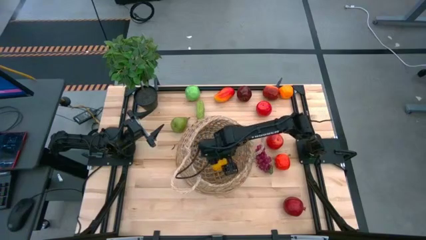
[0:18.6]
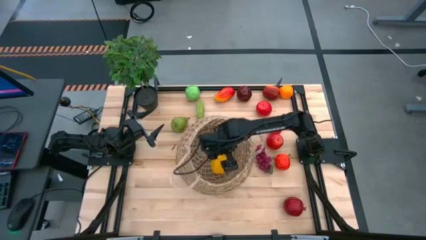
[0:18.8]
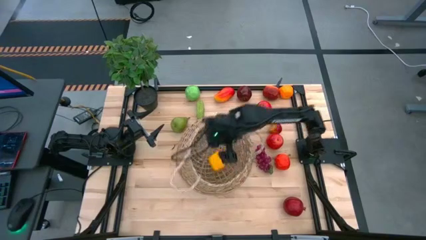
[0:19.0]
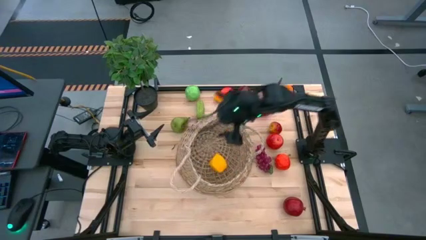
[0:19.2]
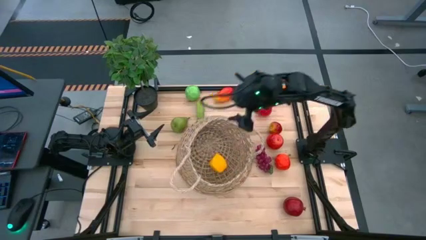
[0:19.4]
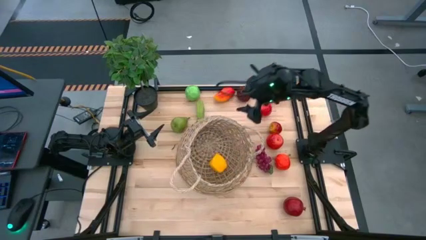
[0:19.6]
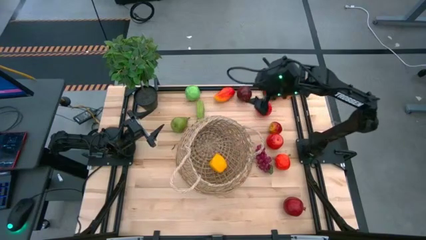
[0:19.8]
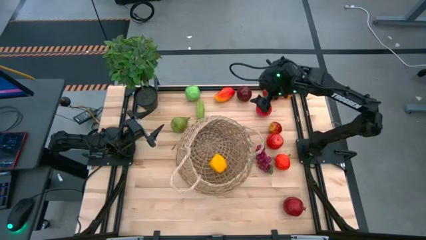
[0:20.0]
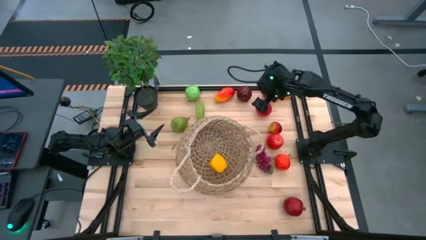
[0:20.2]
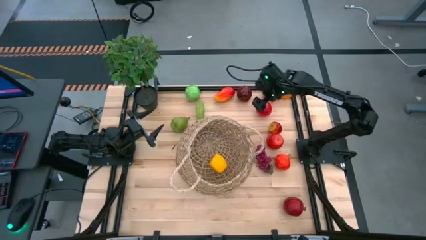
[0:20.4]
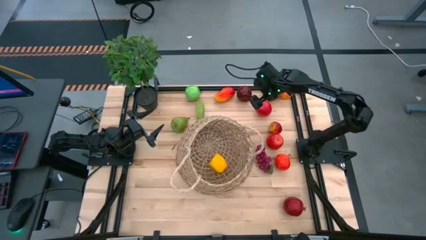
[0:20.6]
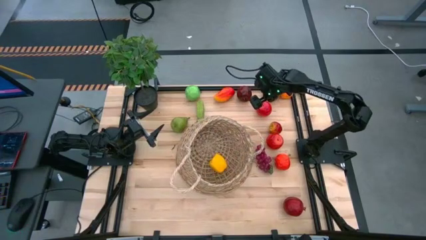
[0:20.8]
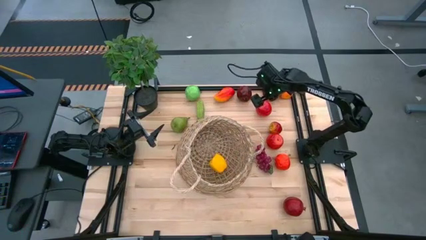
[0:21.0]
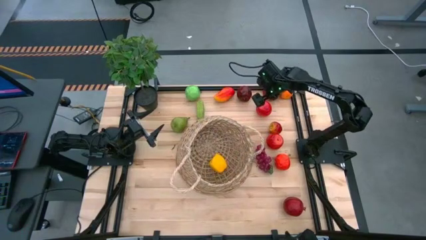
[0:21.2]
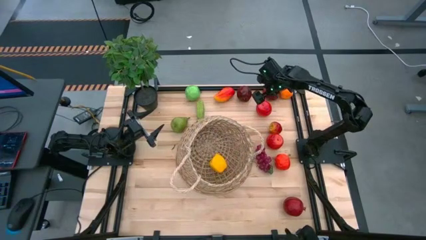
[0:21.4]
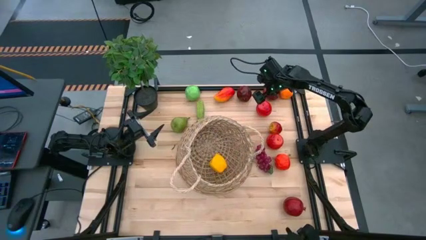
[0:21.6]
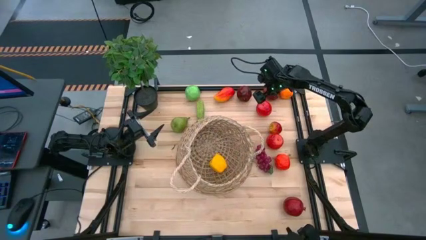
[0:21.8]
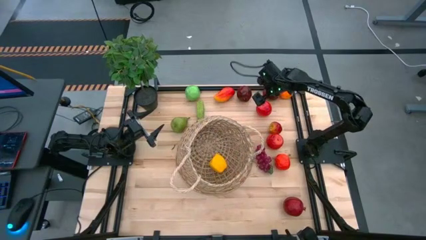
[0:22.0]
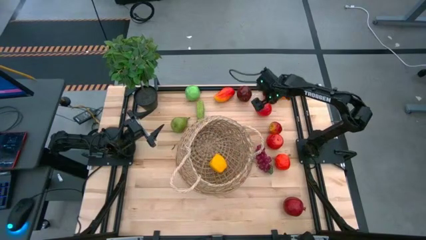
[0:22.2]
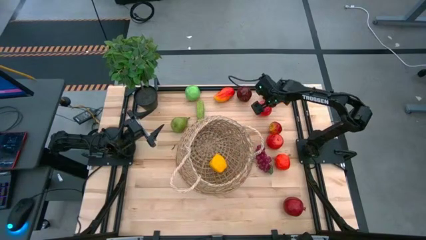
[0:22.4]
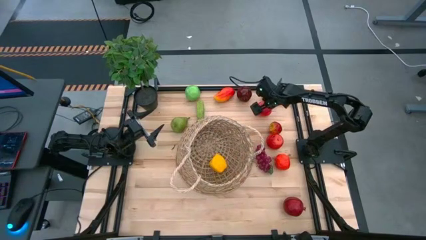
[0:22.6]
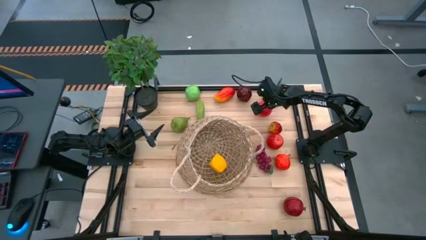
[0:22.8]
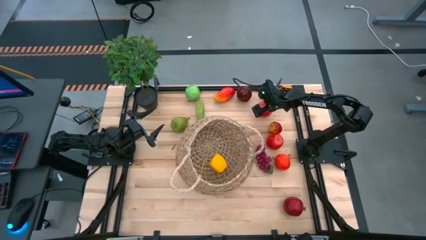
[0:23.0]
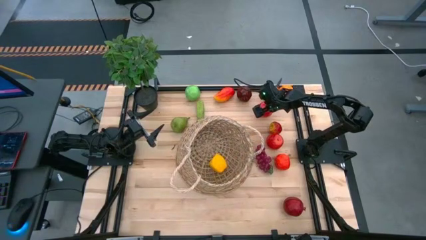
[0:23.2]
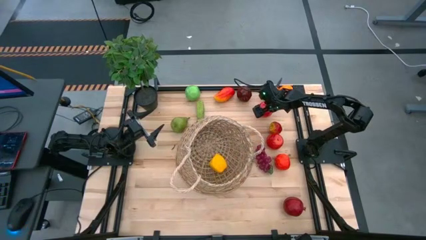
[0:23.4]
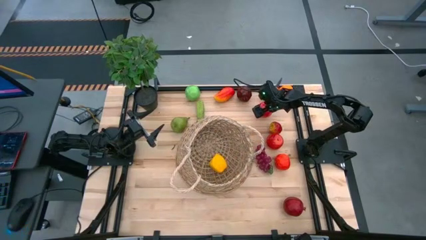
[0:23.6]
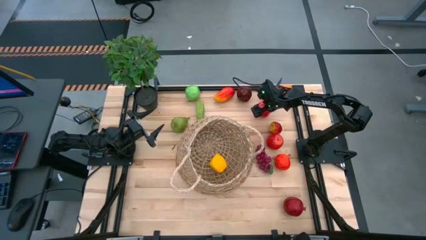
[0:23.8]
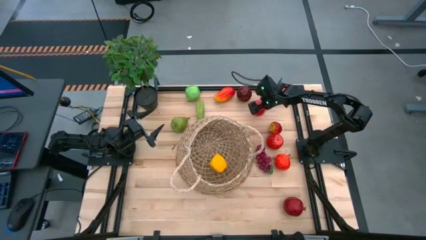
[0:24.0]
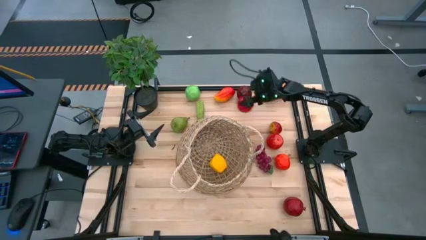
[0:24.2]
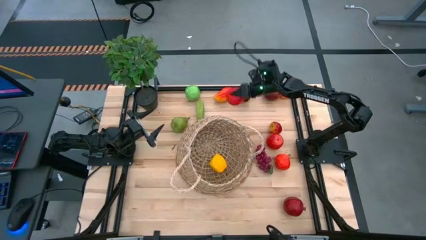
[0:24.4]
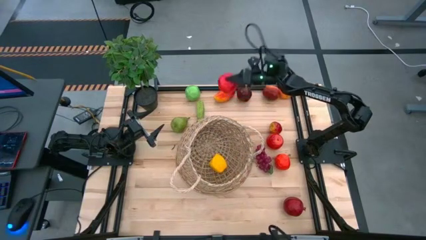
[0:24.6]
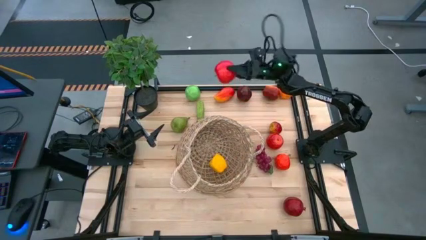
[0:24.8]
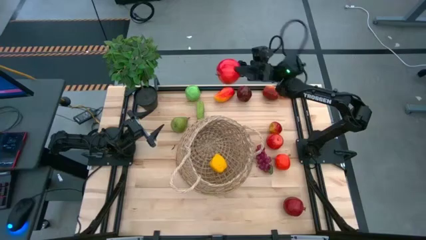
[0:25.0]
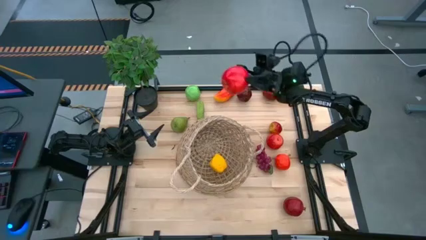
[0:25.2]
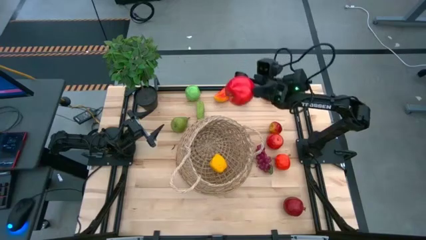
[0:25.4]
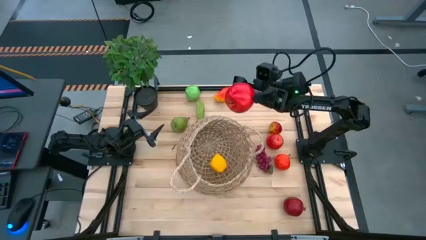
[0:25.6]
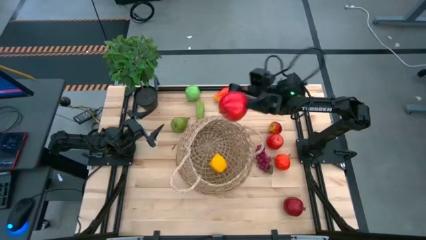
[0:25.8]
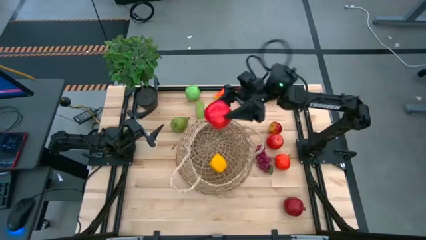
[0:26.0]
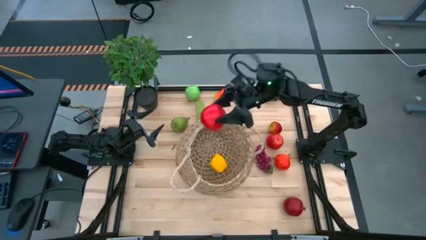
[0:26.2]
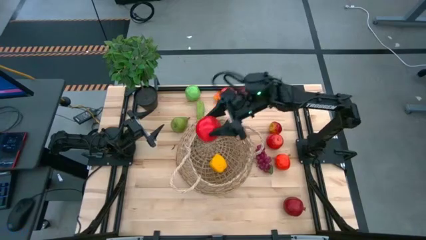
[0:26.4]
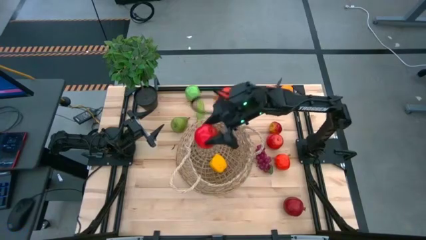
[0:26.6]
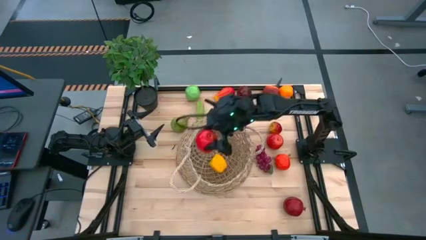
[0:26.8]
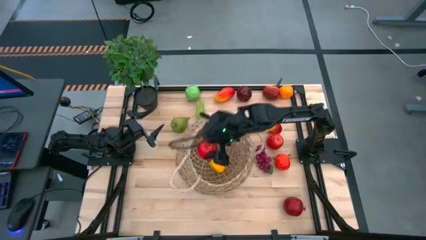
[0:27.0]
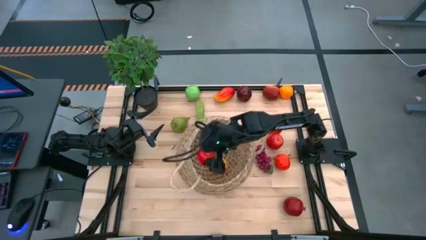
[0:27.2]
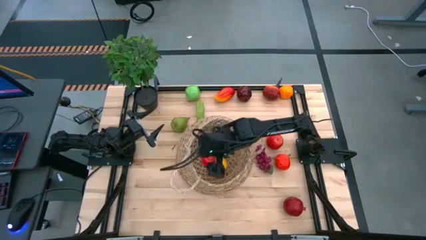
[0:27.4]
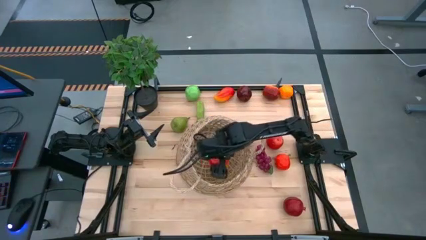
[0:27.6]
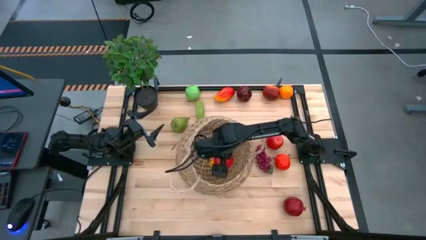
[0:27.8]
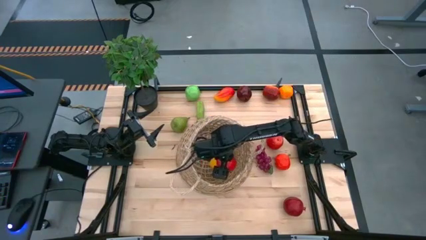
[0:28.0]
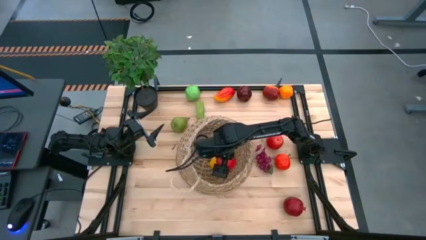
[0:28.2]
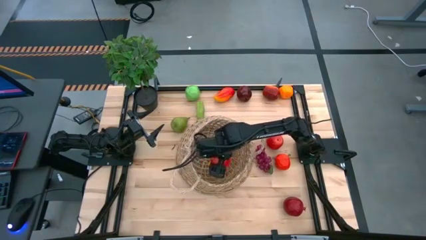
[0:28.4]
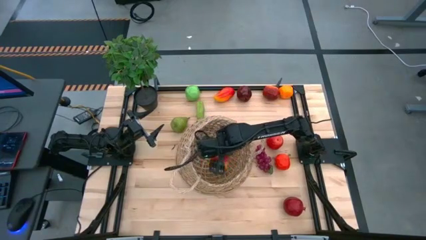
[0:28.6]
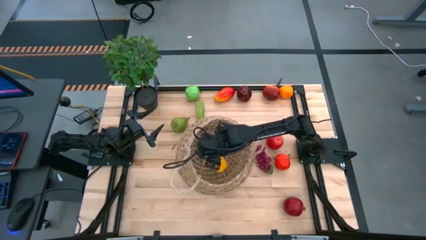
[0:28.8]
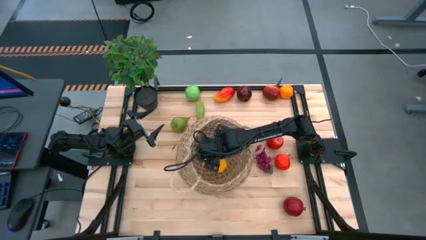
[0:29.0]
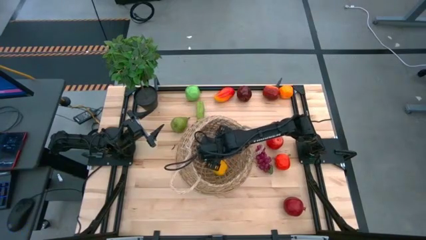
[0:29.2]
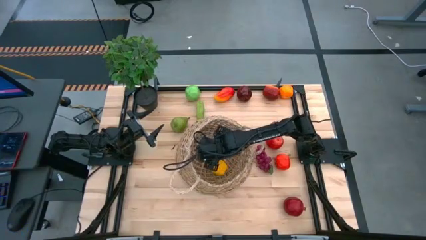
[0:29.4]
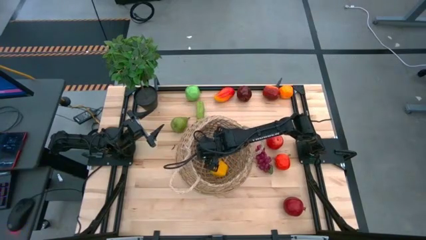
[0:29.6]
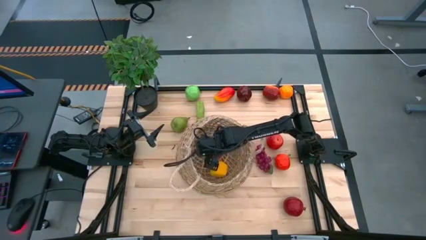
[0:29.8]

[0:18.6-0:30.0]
Task: Build produce basket
Put the red apple into the woven basket

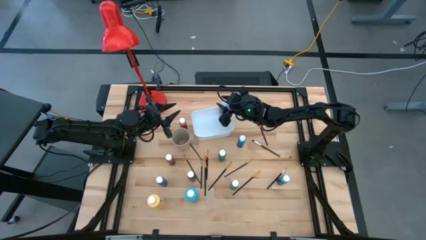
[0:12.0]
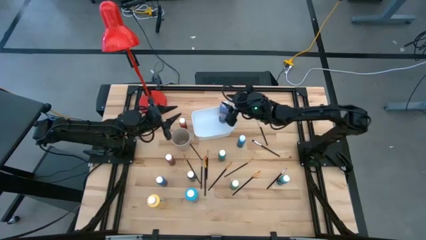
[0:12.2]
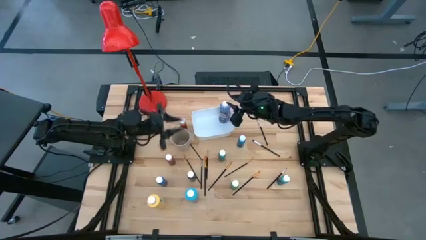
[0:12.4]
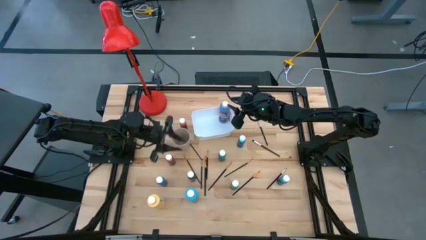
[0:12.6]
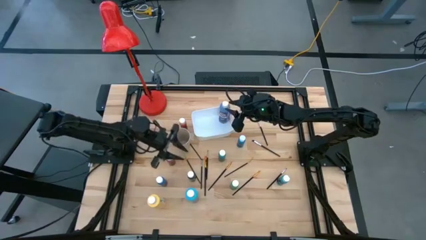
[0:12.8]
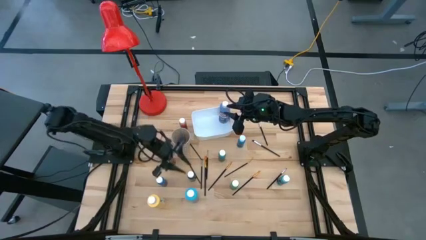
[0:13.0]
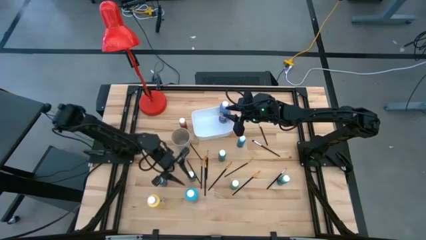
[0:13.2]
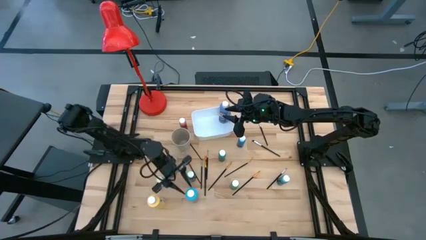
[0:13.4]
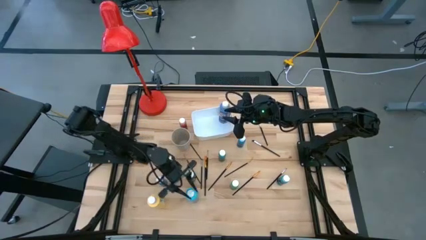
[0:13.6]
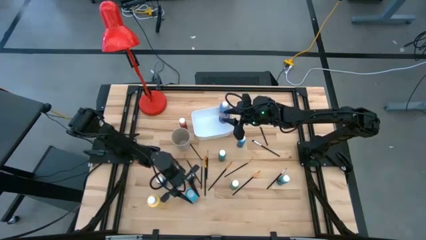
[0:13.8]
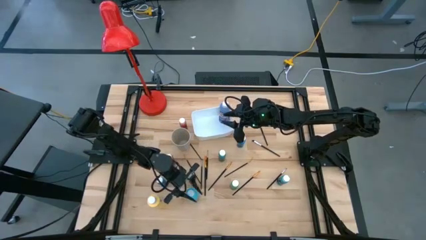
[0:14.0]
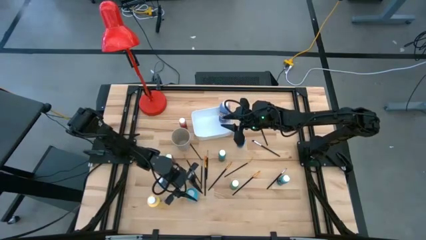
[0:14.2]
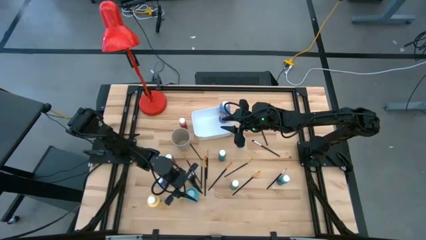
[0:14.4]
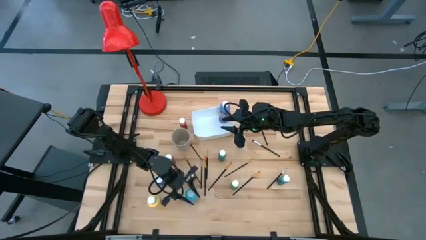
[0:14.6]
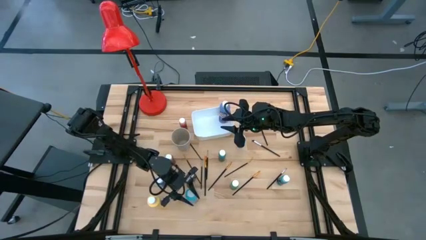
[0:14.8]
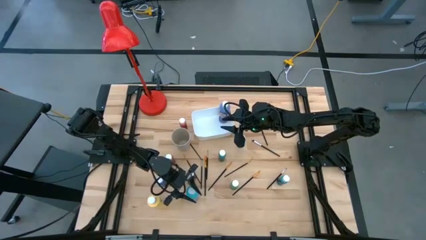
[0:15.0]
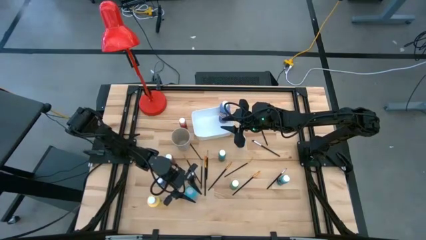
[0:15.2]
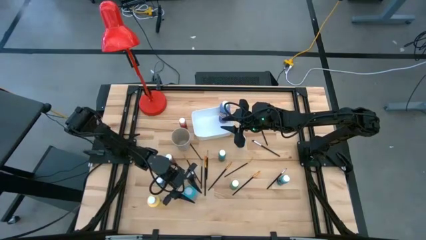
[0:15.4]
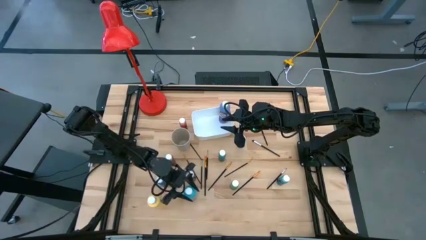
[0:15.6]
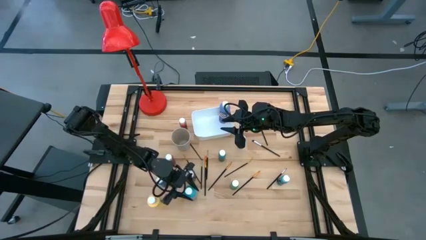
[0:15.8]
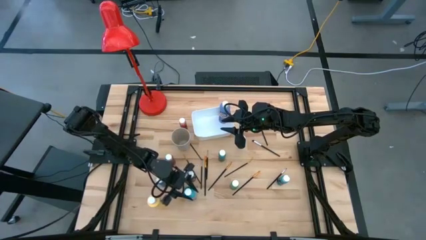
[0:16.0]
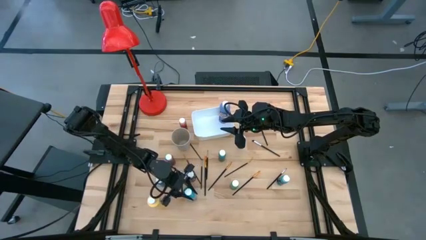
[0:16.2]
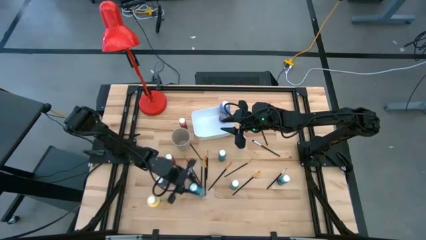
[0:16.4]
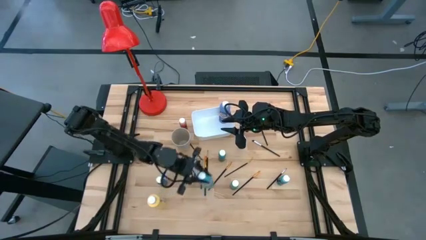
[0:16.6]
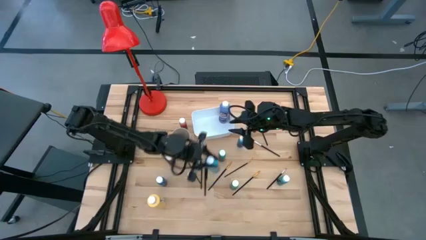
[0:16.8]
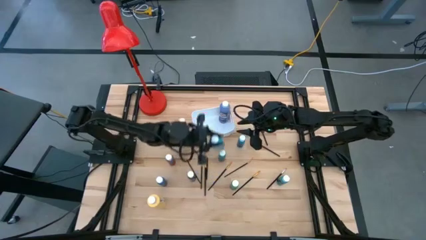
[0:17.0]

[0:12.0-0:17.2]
Task: Pick & Place Paint Supplies
Put the light blue paint bottle into the white bin
